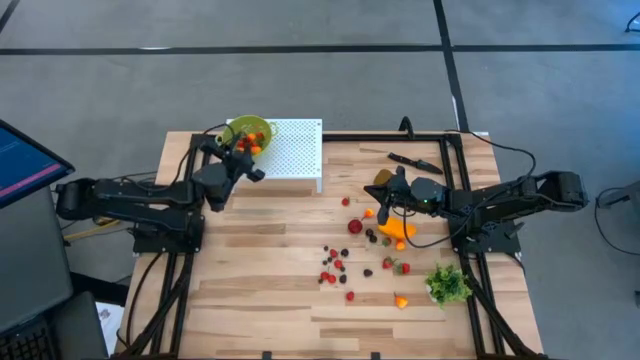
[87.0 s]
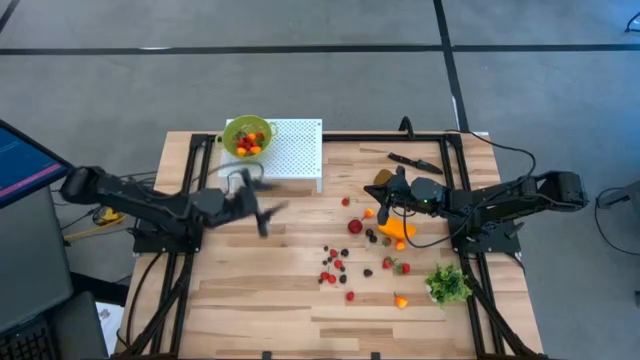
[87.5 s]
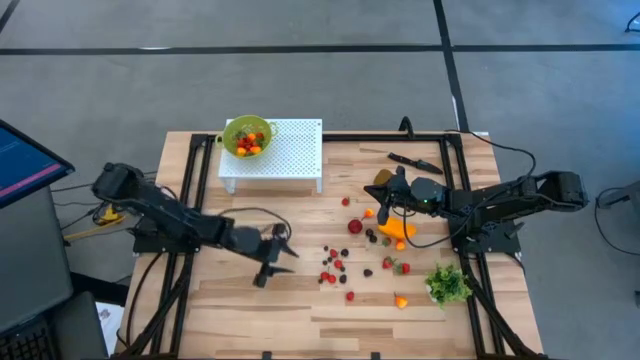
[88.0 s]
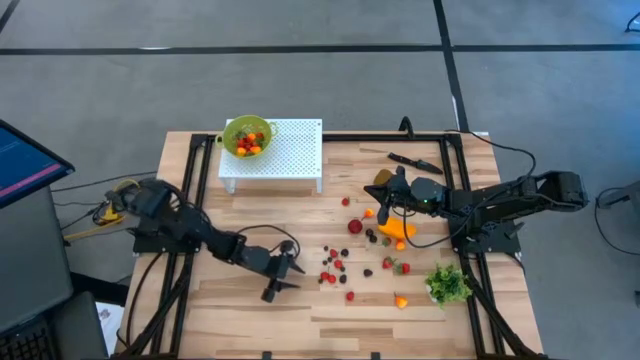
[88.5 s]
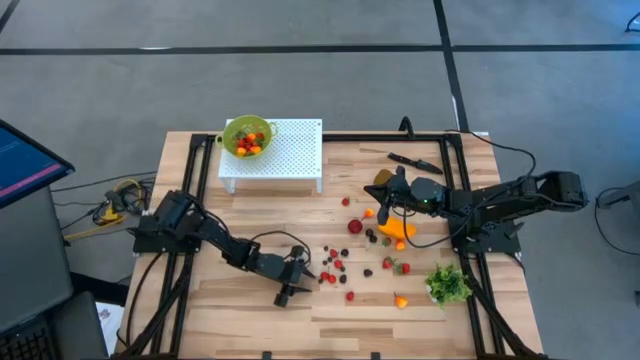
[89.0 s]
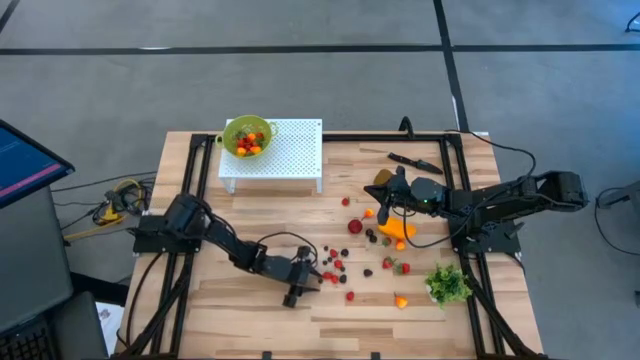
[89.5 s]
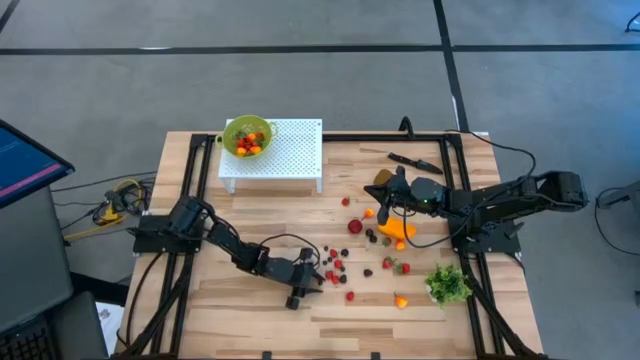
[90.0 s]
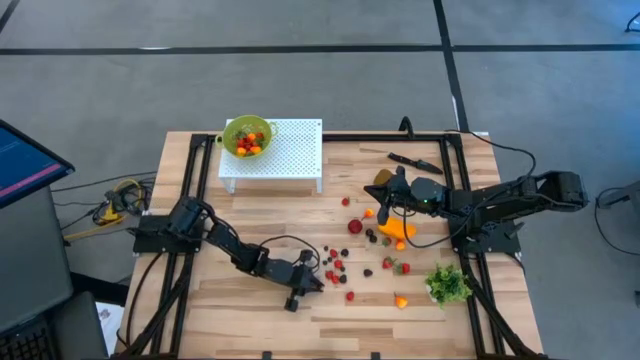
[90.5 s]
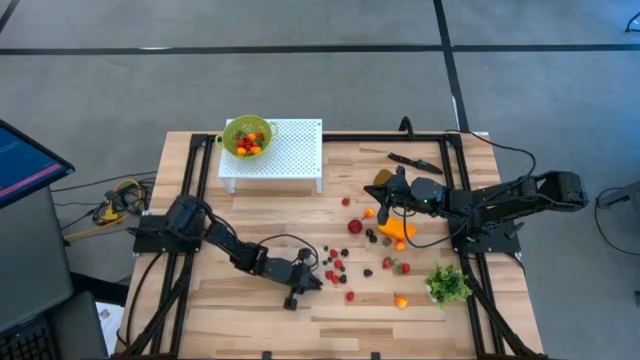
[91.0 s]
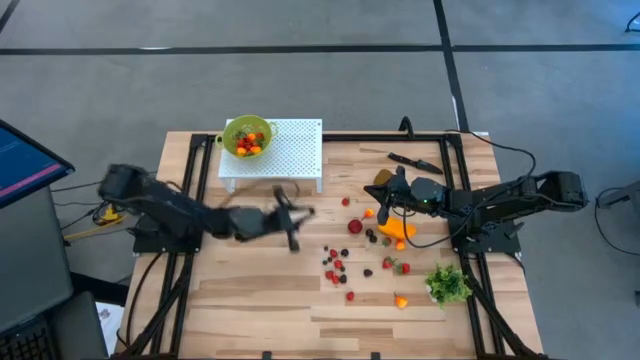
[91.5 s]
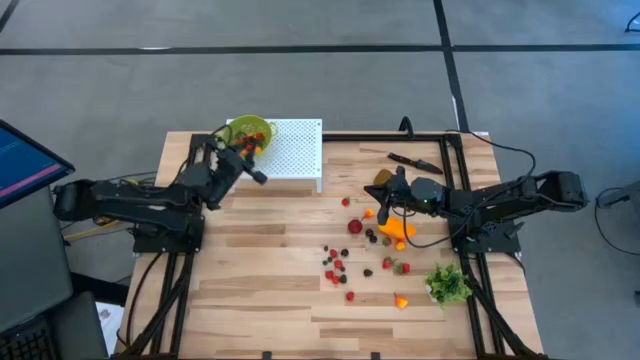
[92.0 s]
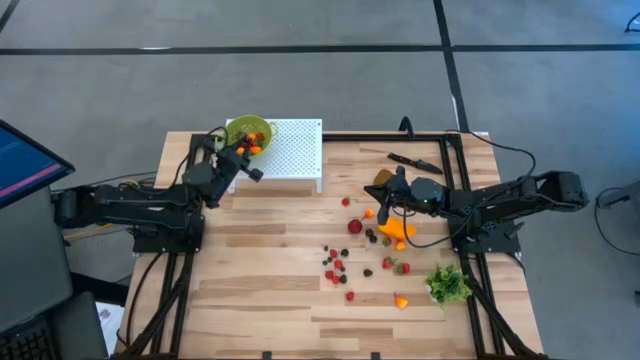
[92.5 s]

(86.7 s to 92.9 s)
Task: Pick & Place Fruit
Put the blueberry into the green strainer bowl

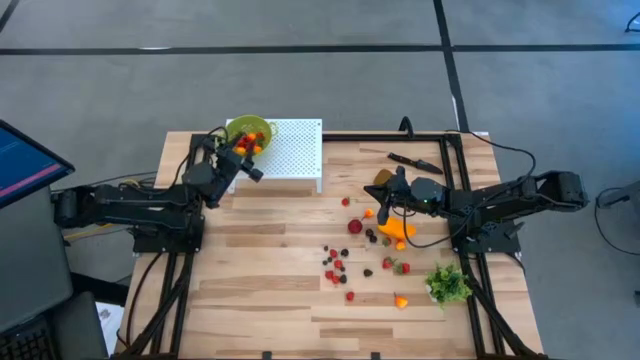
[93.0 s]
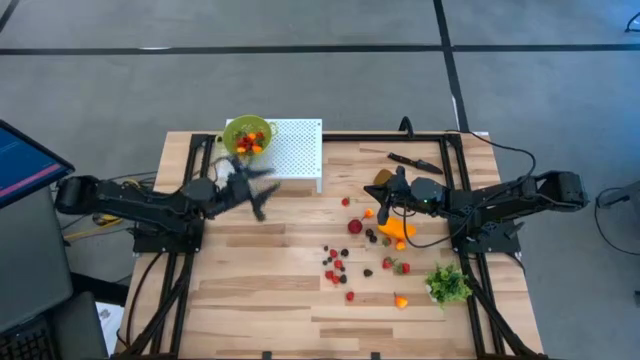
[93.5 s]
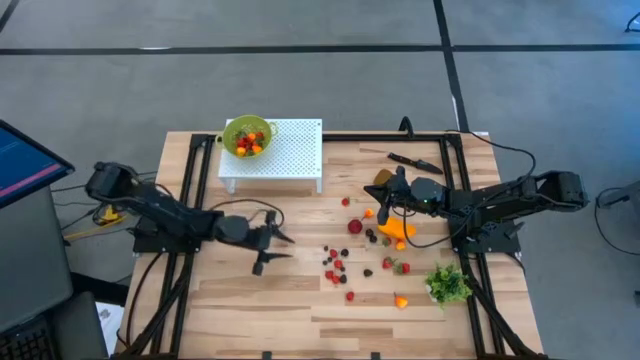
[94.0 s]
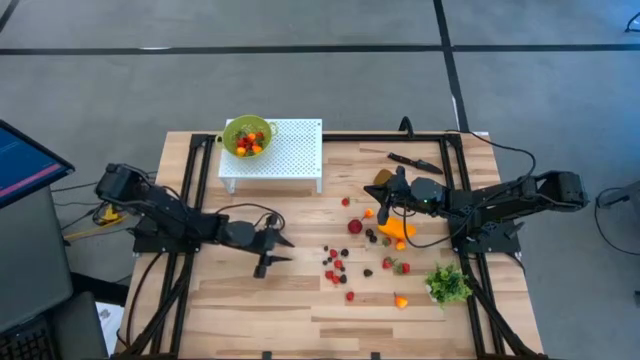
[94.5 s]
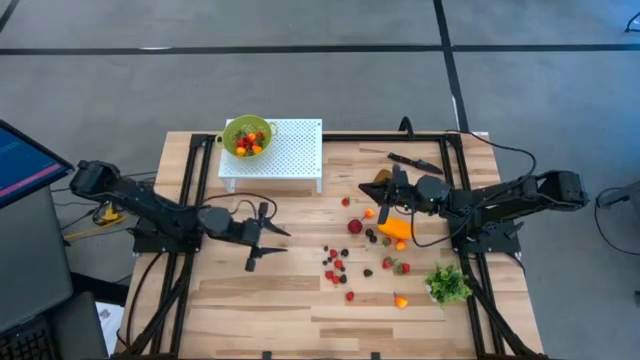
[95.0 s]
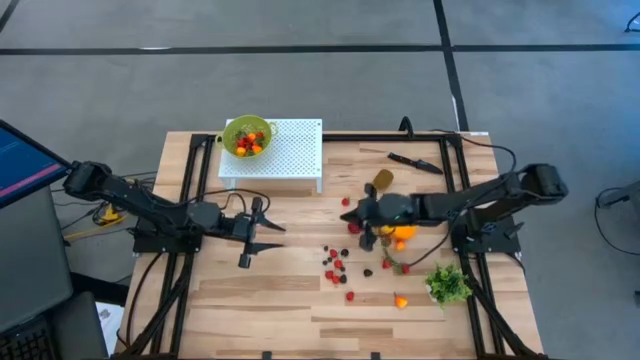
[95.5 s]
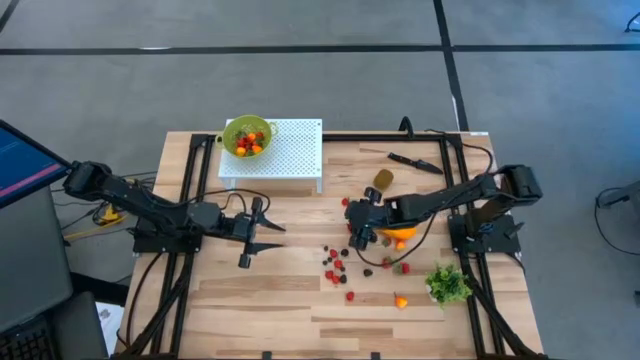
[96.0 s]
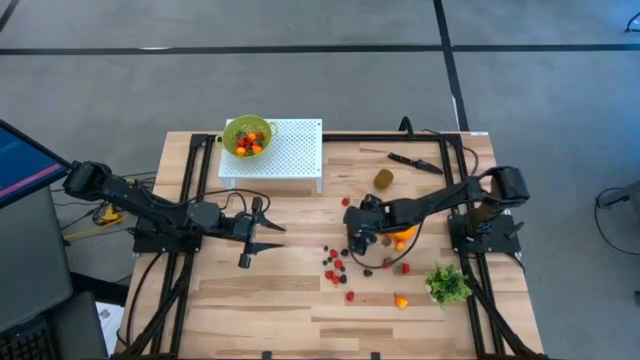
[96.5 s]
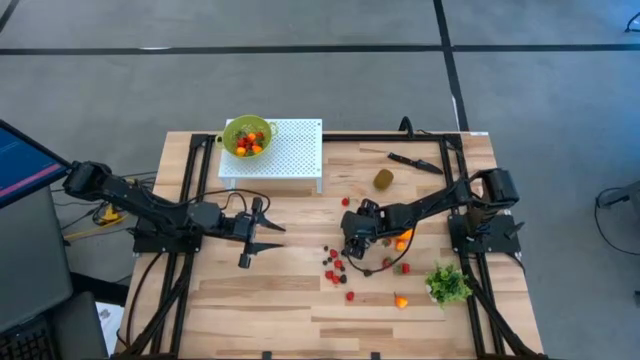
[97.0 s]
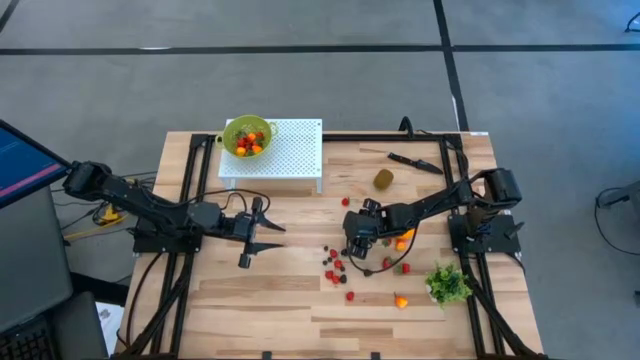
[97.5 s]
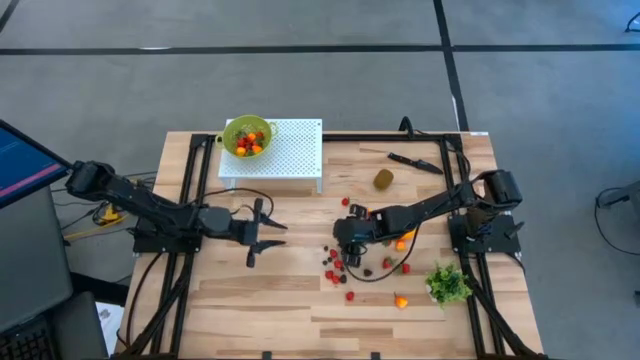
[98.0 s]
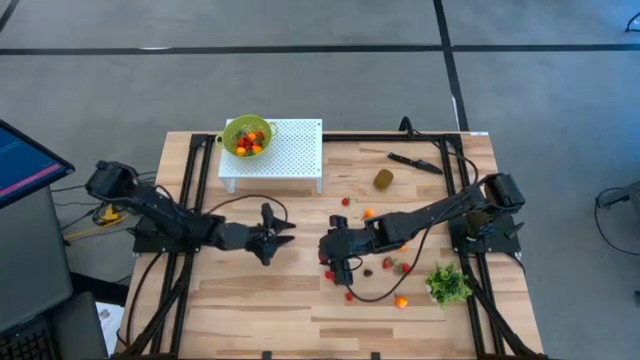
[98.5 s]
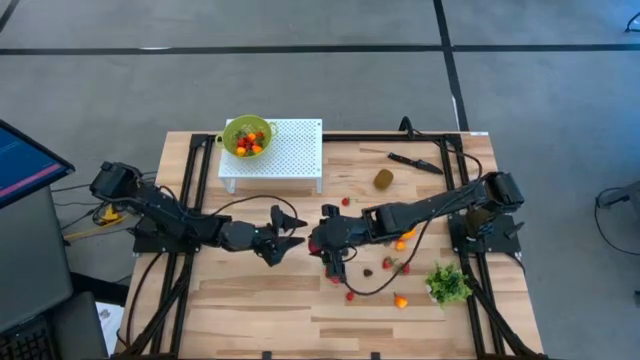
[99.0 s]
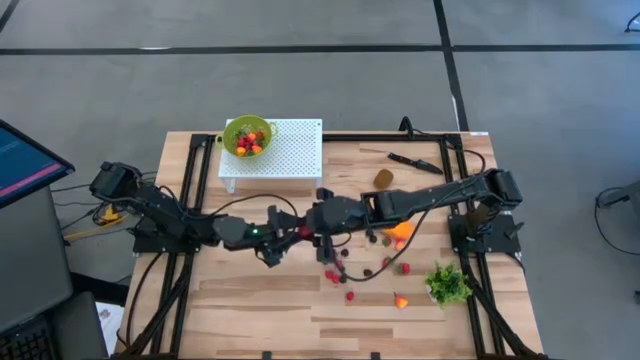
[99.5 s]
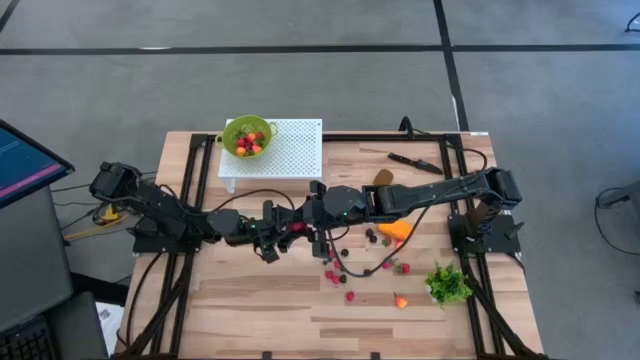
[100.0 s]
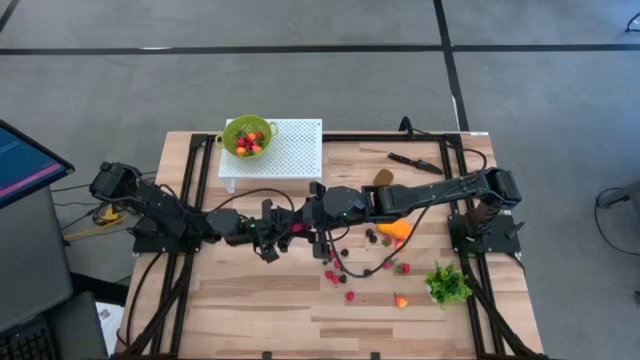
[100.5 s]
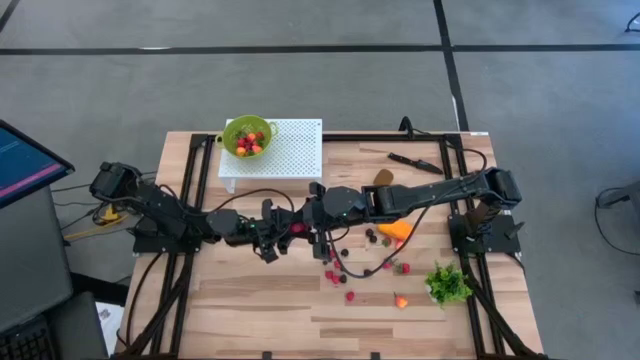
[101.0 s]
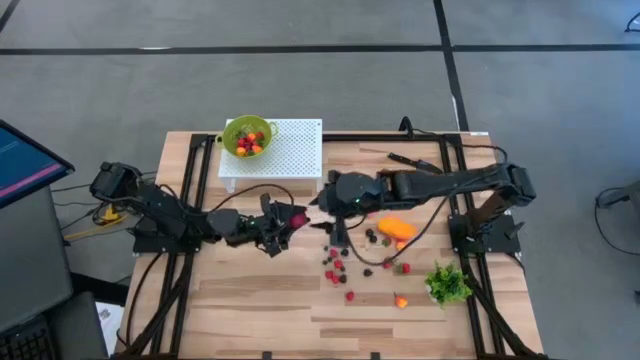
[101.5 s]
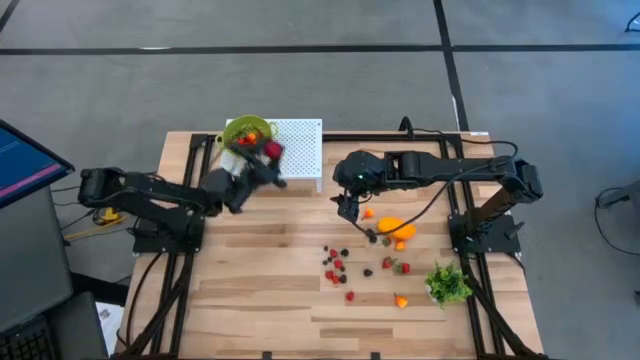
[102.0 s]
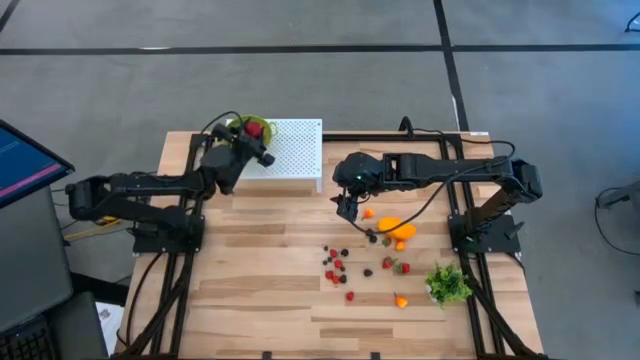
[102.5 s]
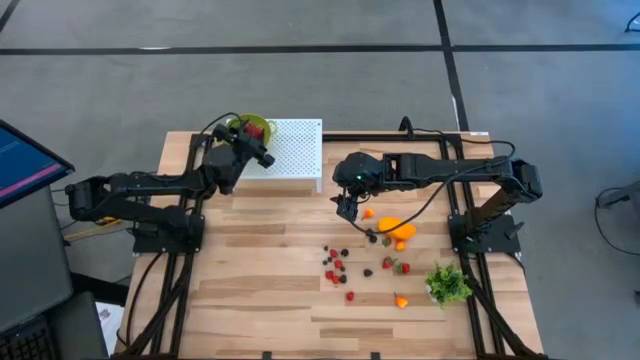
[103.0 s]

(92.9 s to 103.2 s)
Put the pomegranate into the green strainer bowl on the shelf

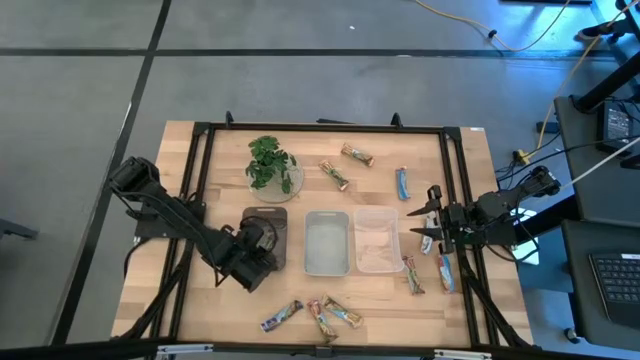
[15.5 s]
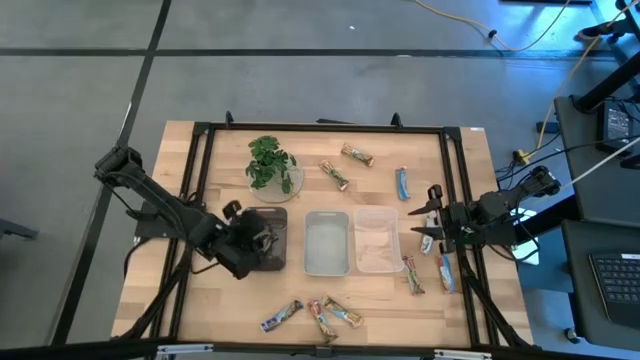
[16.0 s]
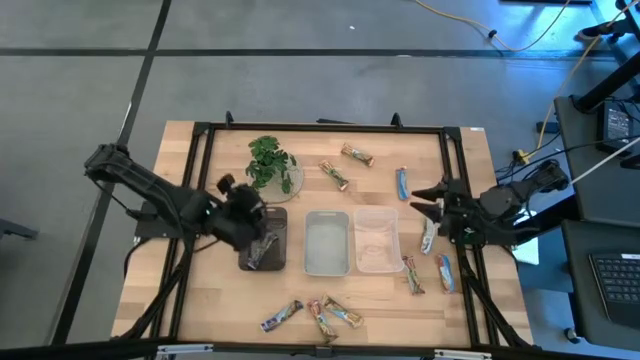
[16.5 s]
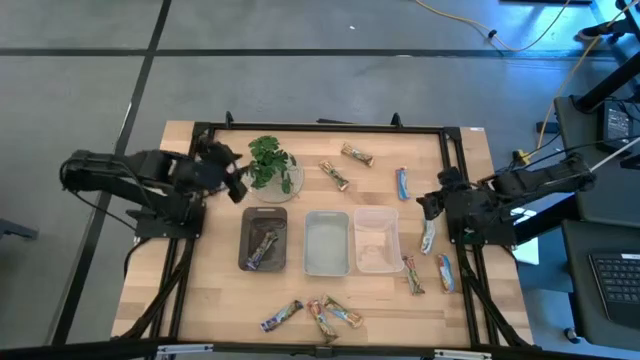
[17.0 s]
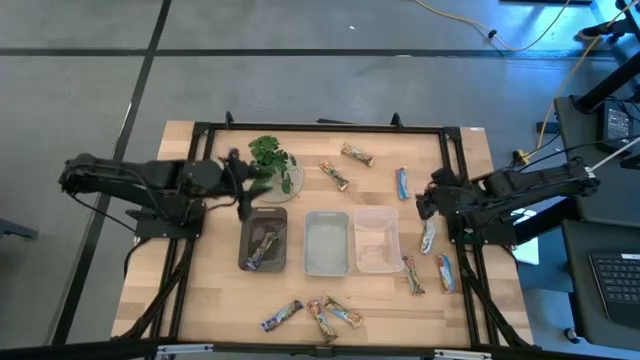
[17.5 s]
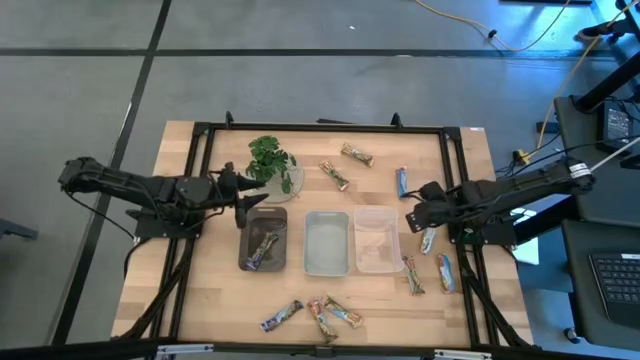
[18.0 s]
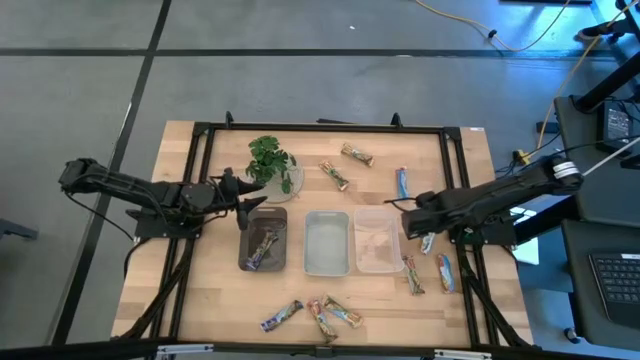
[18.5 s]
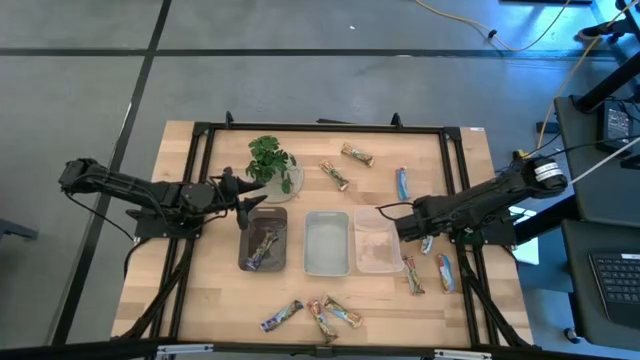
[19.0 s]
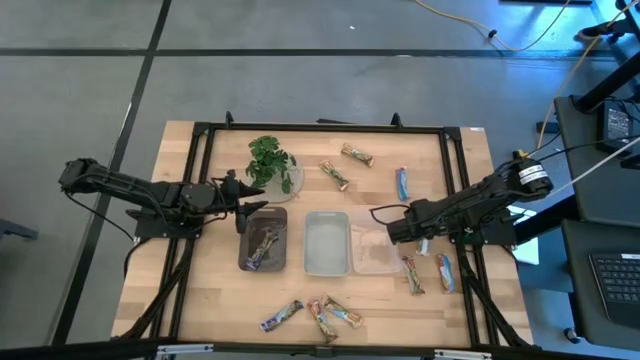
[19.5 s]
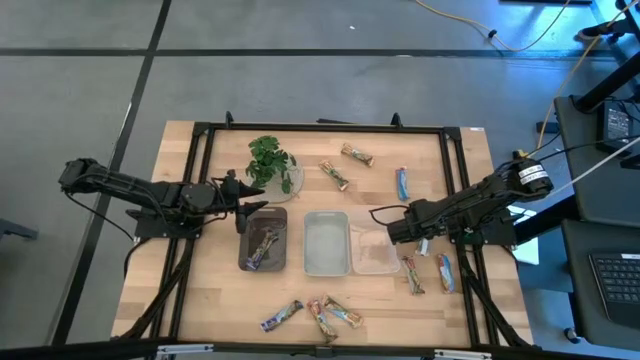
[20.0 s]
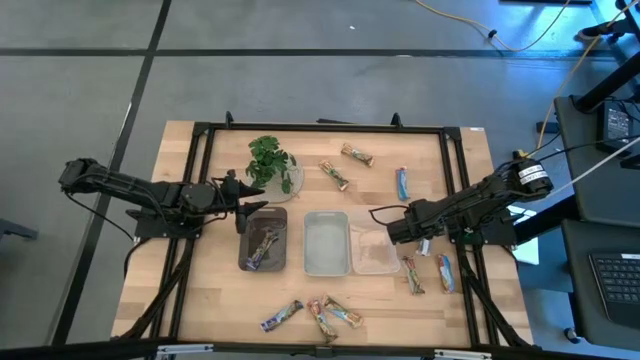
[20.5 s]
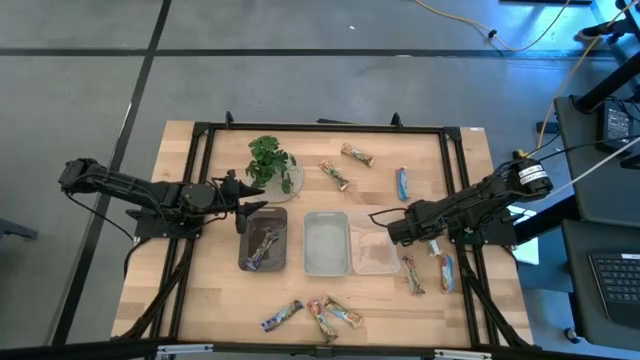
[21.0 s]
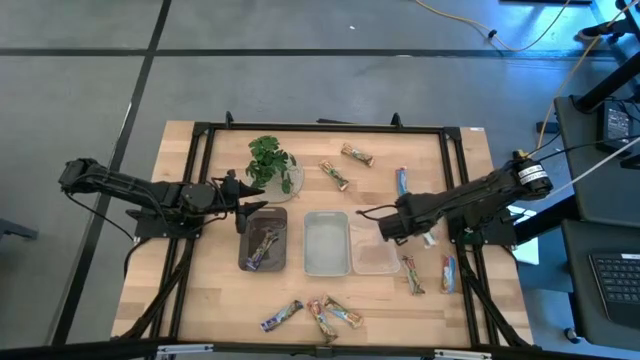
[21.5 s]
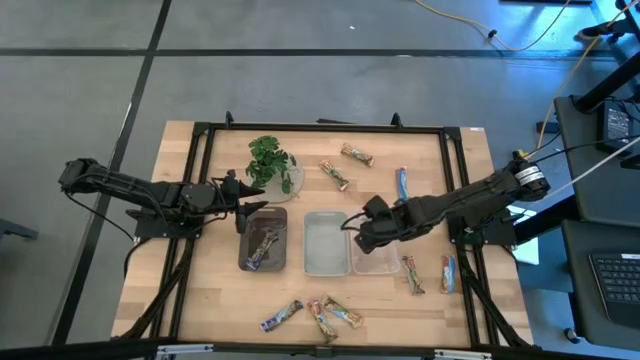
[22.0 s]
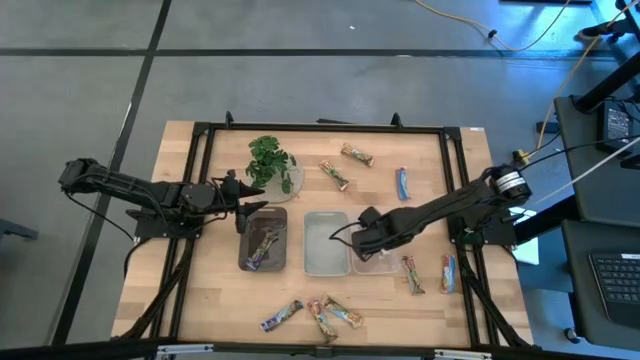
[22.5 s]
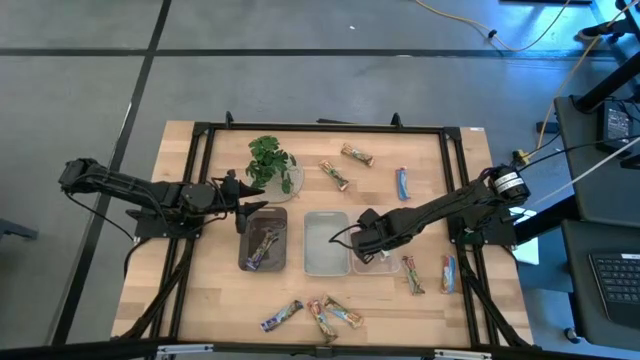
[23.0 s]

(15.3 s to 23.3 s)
Task: Pick and place Granola Bars by type
Put the orange granola bar into the transparent bin
